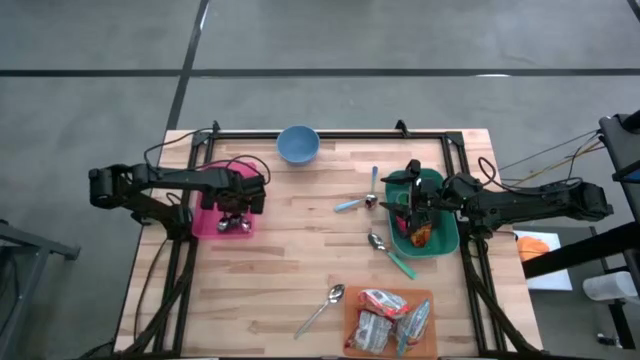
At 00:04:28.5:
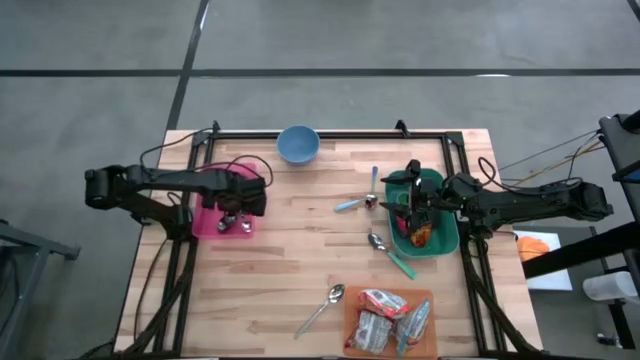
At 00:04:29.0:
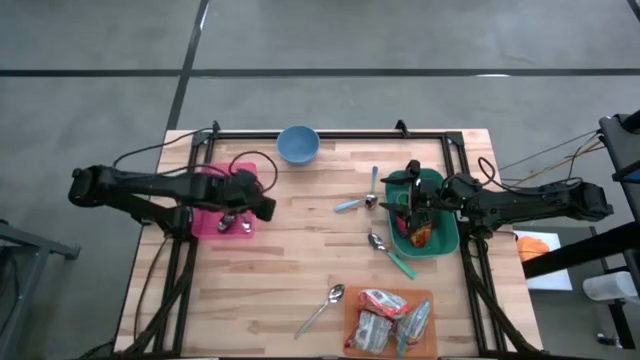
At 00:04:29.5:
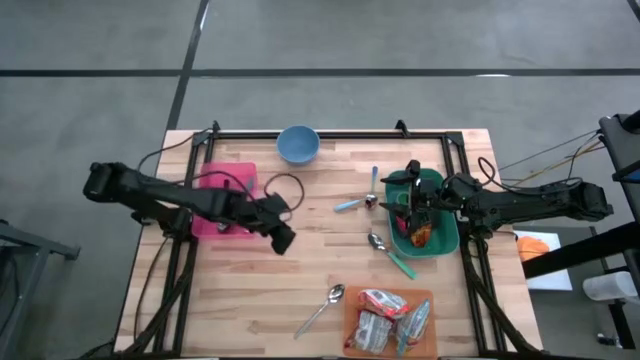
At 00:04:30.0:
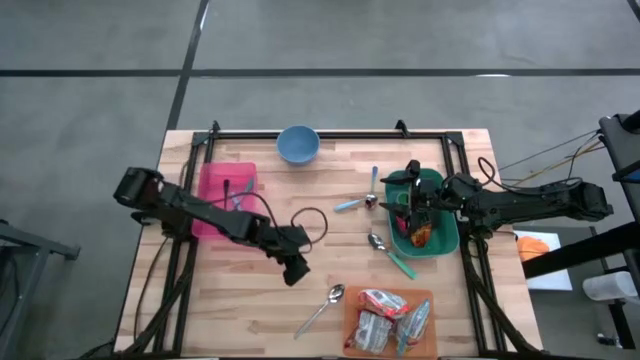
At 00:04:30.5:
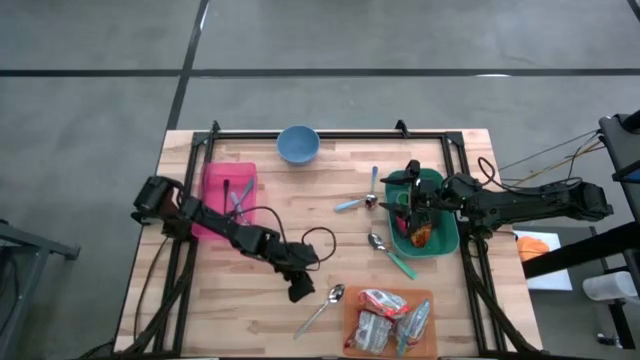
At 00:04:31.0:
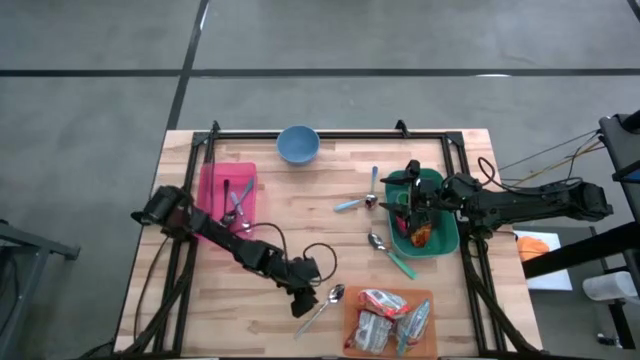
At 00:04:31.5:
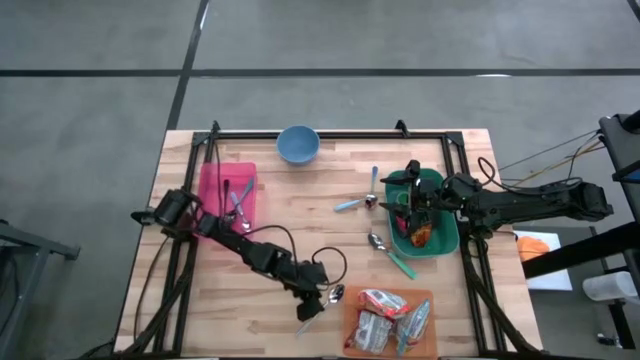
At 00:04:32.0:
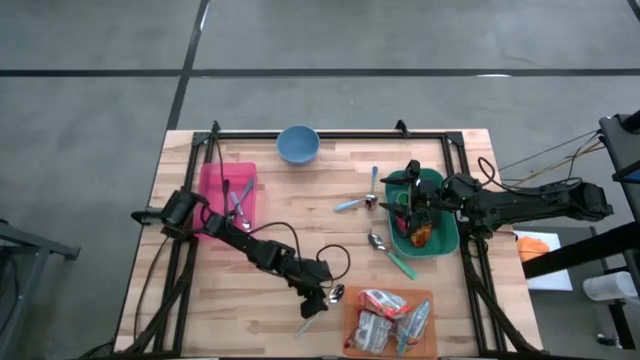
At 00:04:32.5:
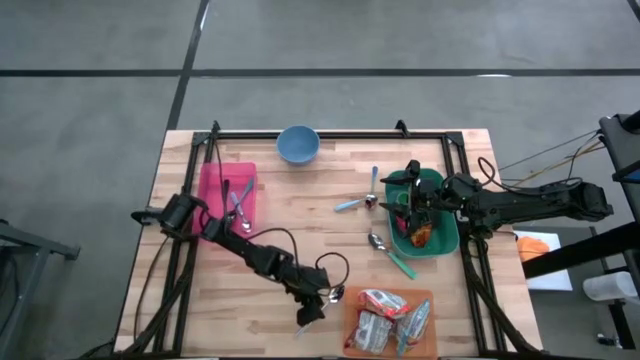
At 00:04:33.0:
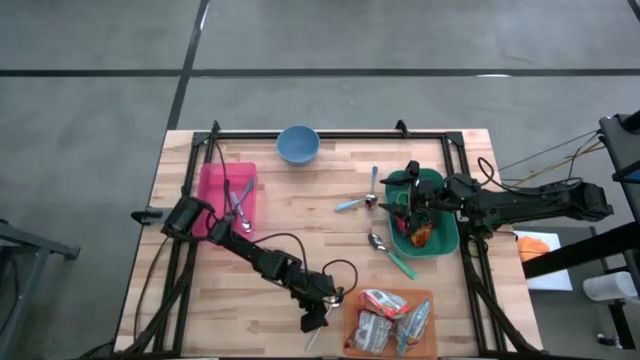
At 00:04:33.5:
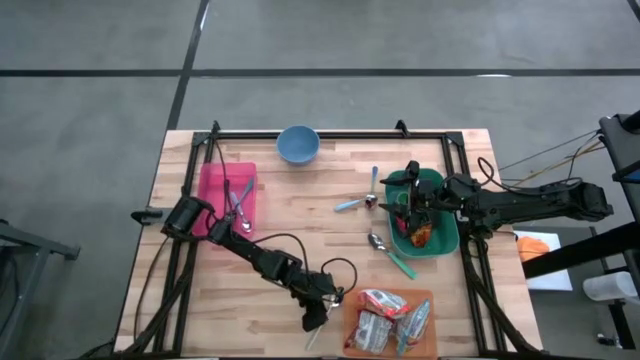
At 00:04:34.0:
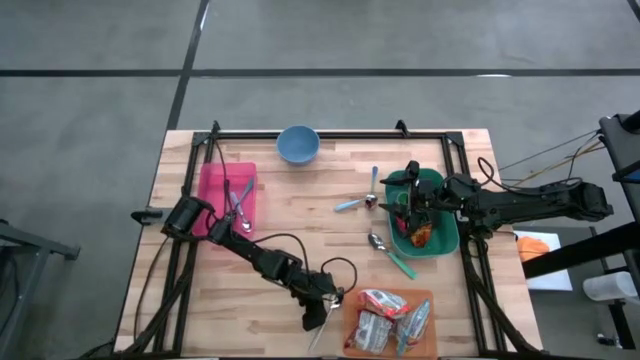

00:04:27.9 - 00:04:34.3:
Put the silver spoon into the pink bin

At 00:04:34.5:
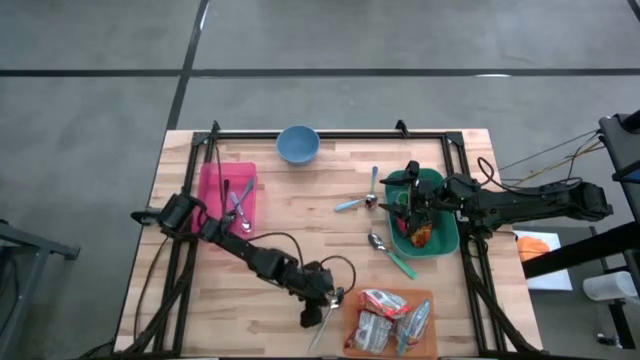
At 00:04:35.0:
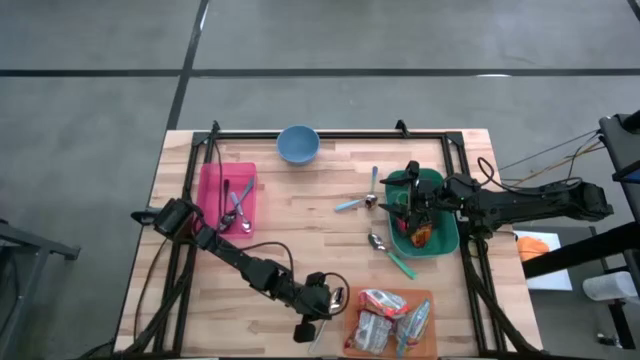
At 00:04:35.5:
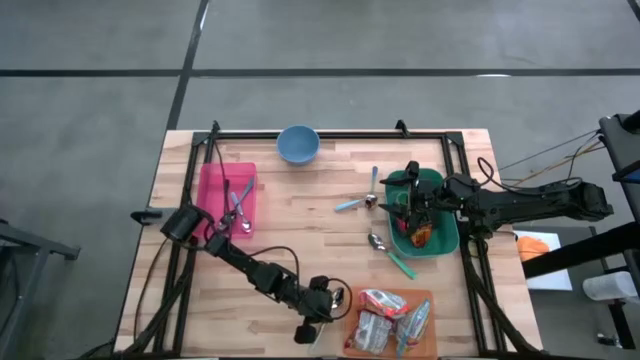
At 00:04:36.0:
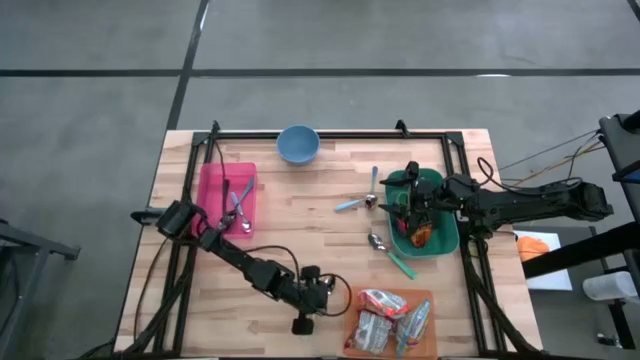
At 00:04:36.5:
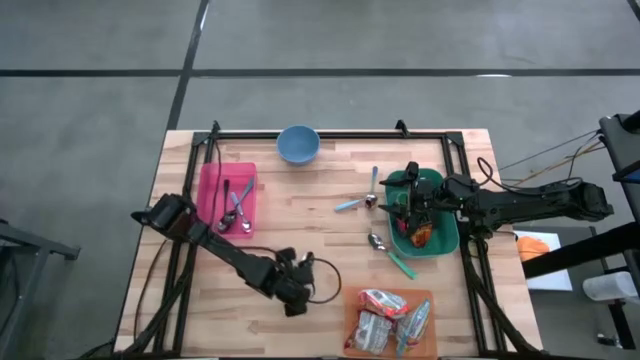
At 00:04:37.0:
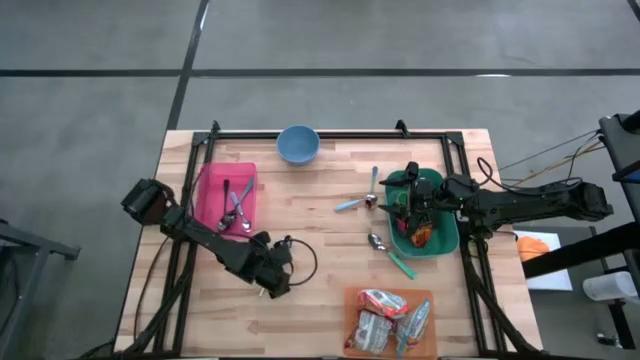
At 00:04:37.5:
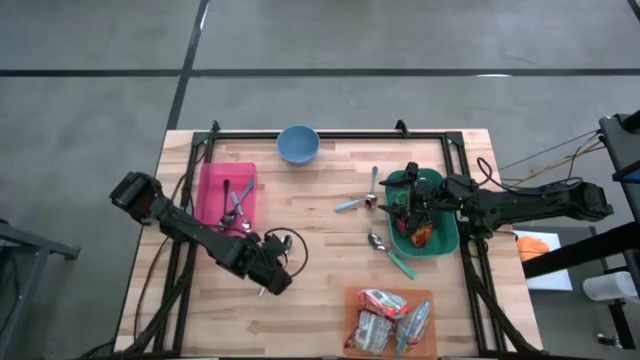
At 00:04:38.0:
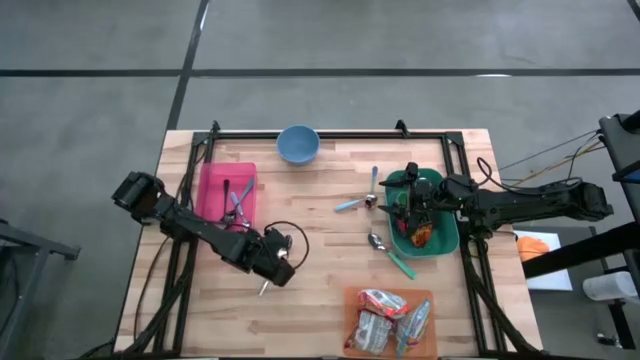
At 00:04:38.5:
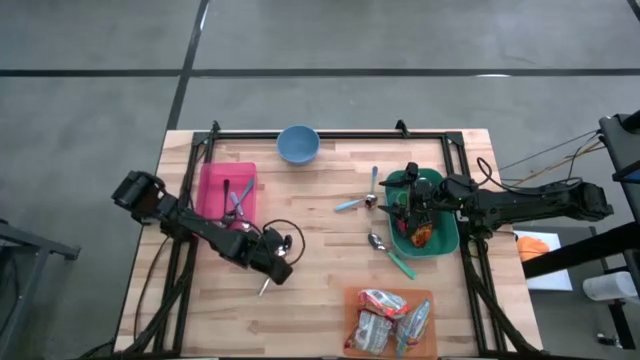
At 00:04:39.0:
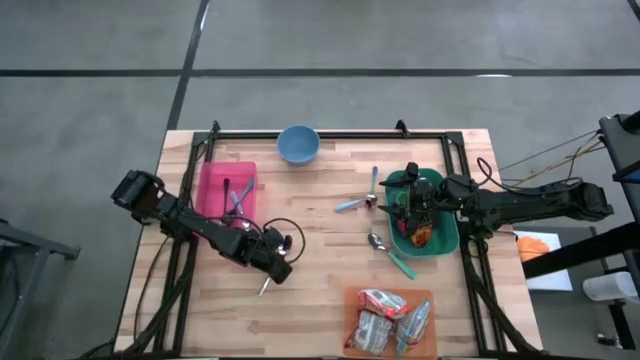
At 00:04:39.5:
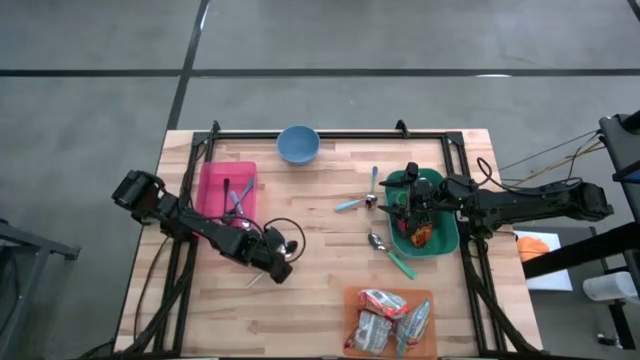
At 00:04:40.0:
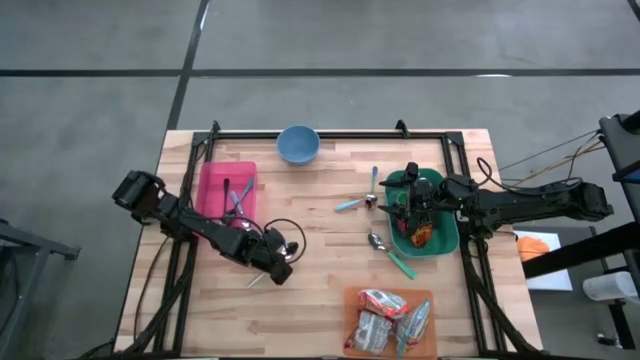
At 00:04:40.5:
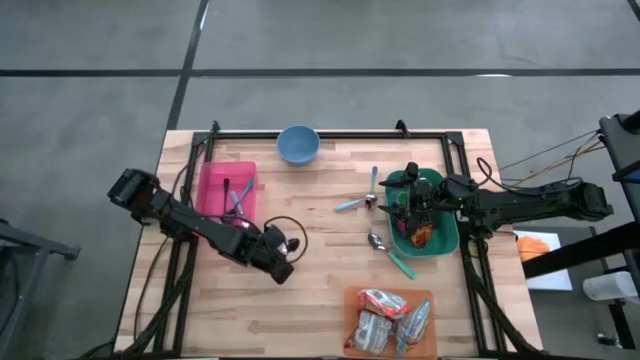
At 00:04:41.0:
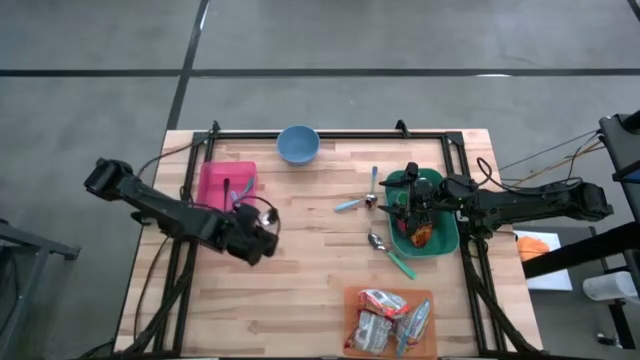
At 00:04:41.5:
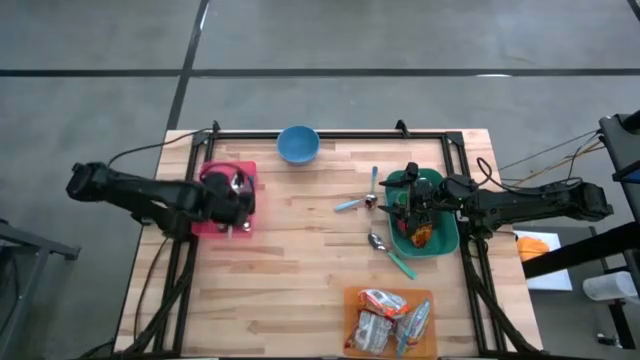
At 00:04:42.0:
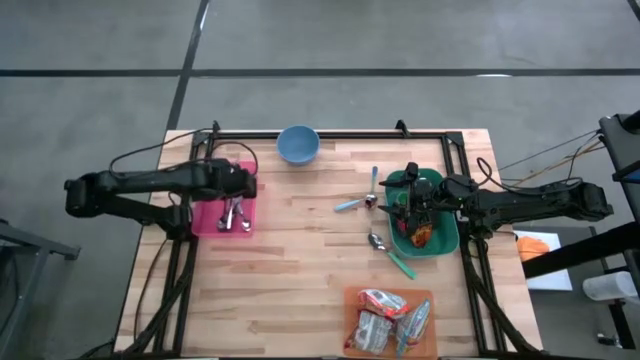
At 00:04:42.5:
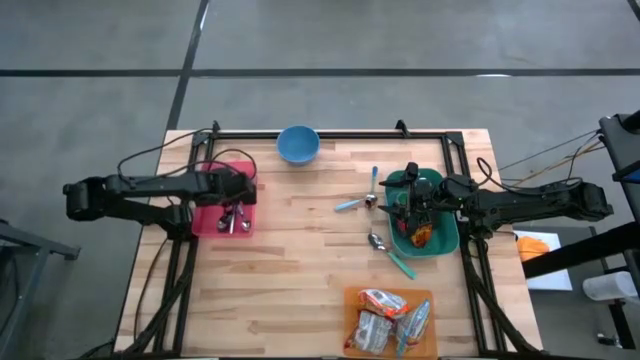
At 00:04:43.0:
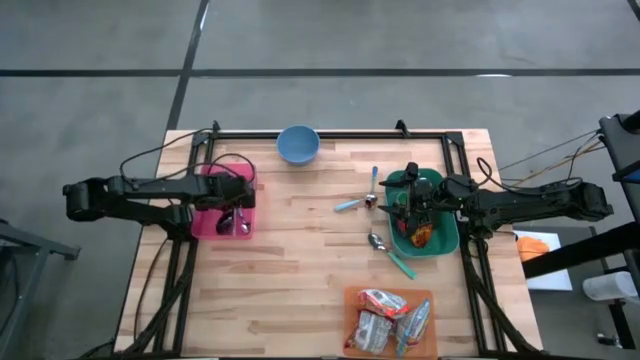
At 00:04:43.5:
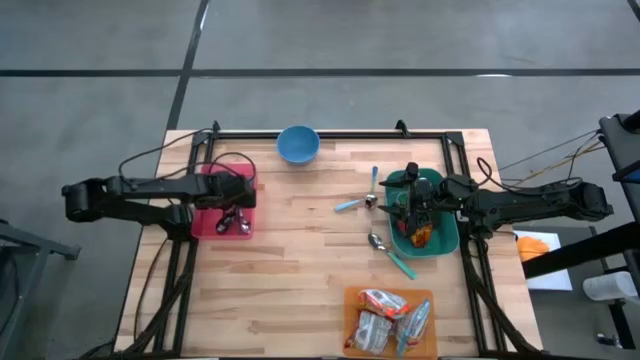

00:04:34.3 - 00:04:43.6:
Put the silver spoon into the pink bin

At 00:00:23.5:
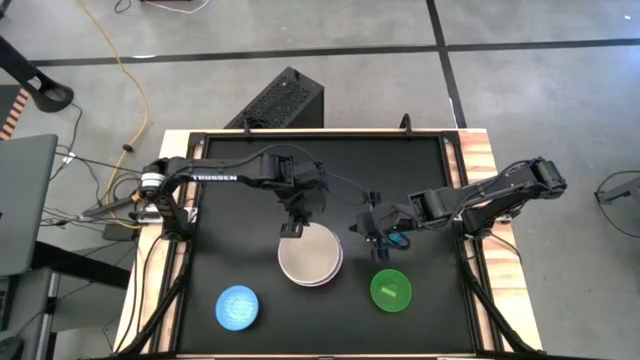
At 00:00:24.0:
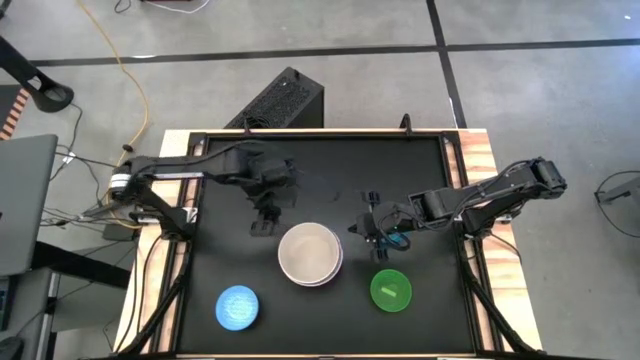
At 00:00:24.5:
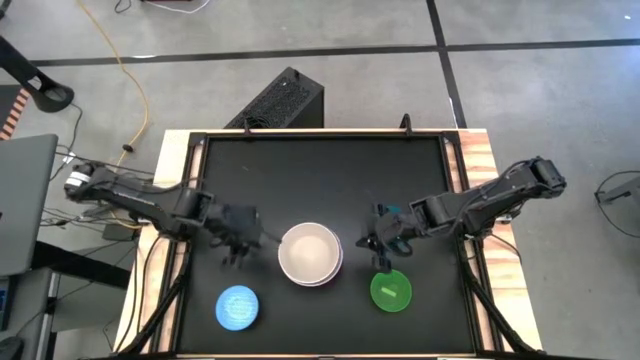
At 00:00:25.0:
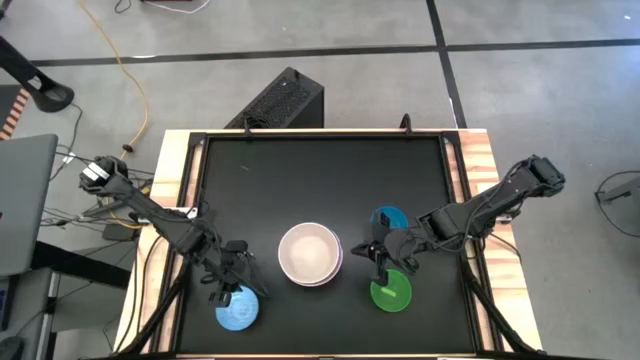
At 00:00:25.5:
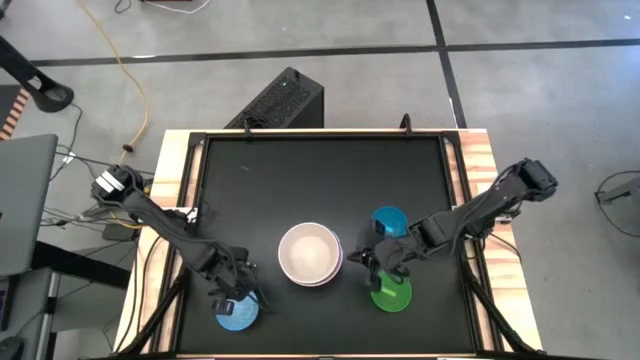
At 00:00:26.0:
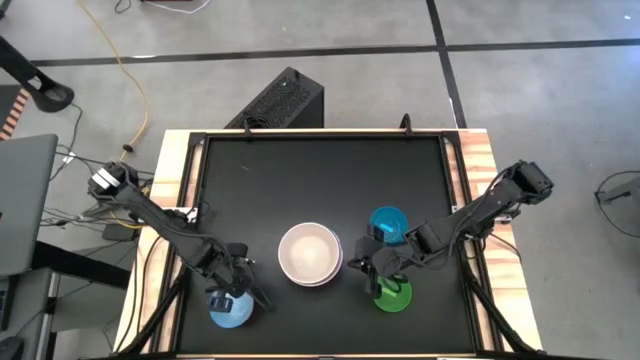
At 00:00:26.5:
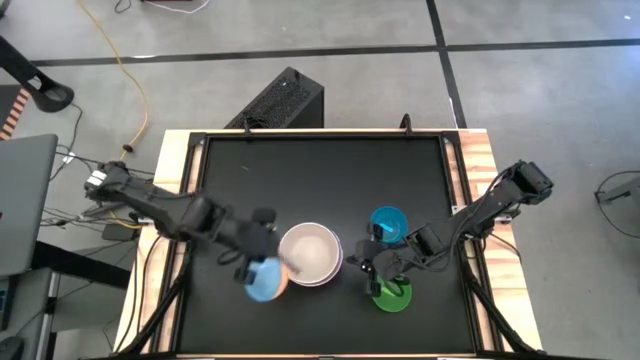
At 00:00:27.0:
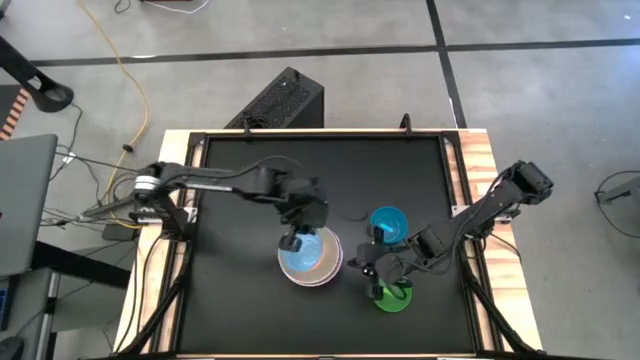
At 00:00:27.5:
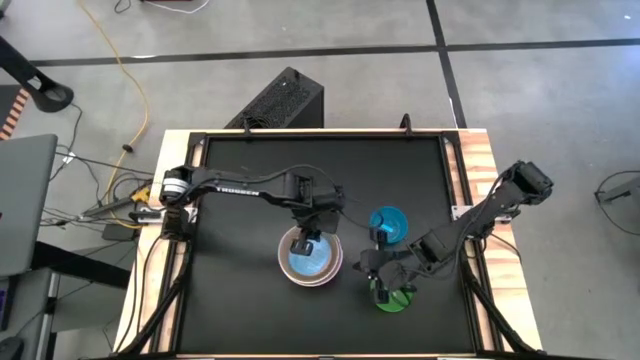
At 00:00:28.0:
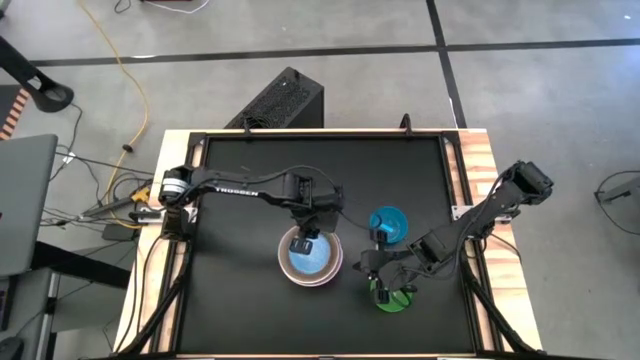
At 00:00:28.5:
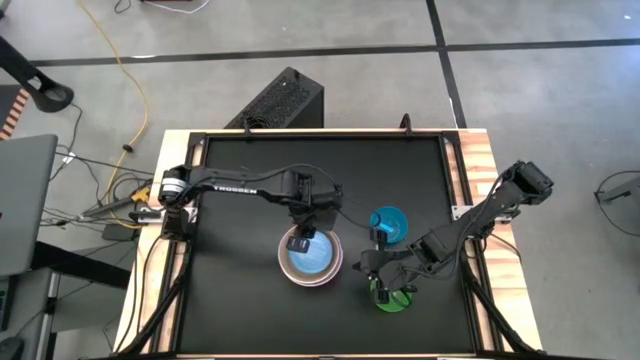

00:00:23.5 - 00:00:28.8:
Stack the blue patterned bowl on top of the white bowl
